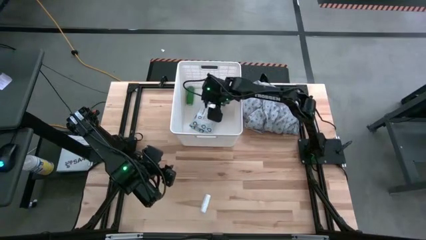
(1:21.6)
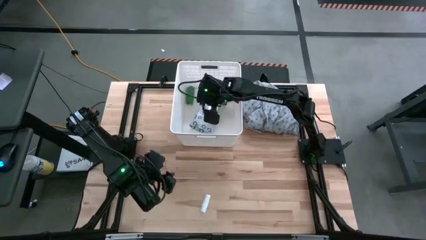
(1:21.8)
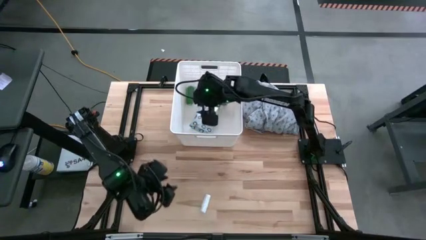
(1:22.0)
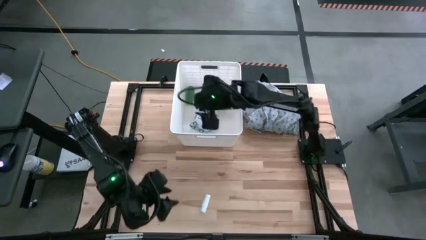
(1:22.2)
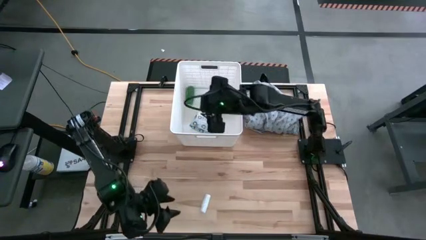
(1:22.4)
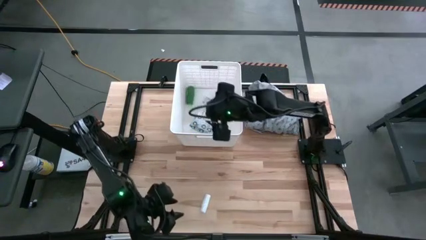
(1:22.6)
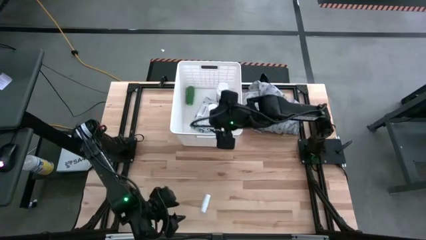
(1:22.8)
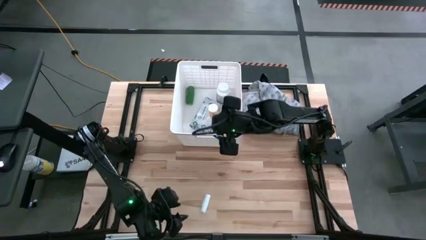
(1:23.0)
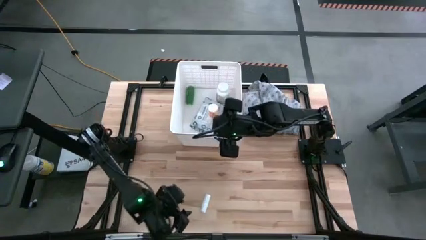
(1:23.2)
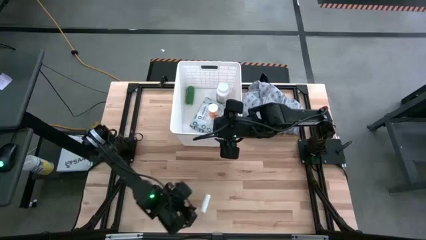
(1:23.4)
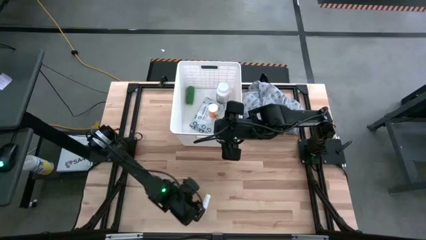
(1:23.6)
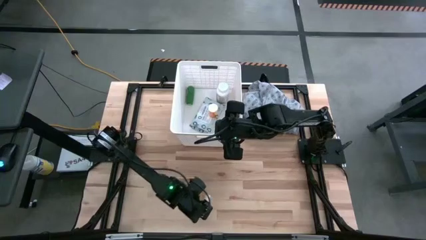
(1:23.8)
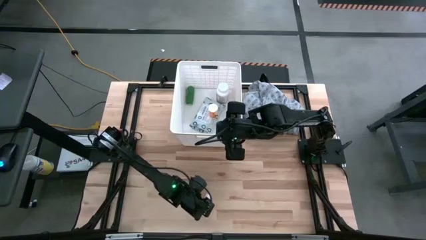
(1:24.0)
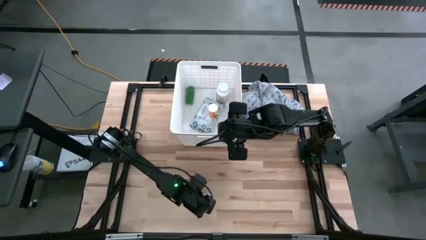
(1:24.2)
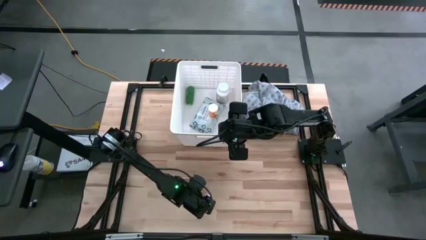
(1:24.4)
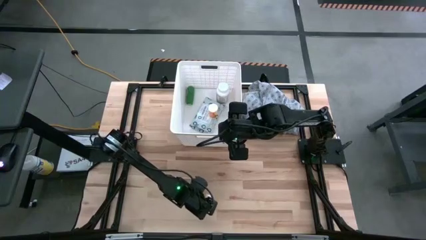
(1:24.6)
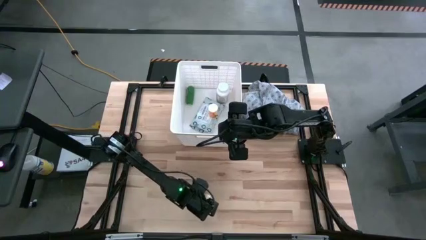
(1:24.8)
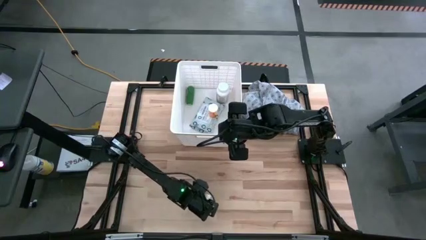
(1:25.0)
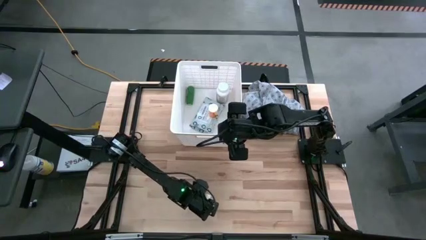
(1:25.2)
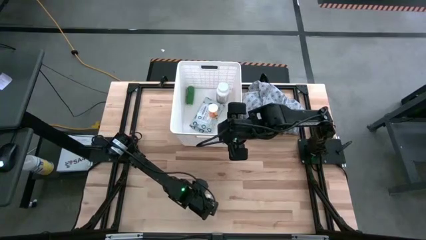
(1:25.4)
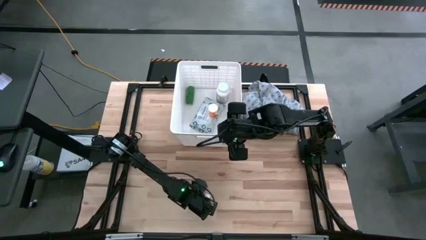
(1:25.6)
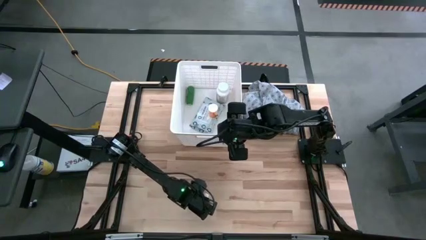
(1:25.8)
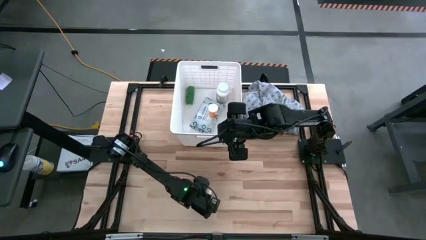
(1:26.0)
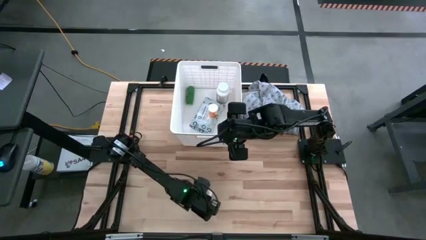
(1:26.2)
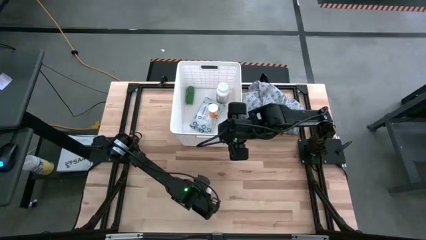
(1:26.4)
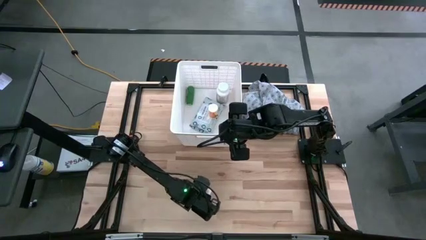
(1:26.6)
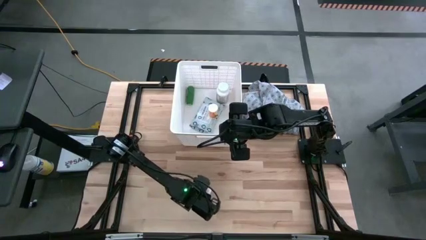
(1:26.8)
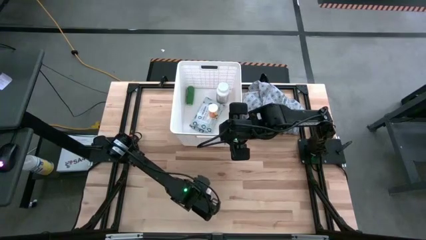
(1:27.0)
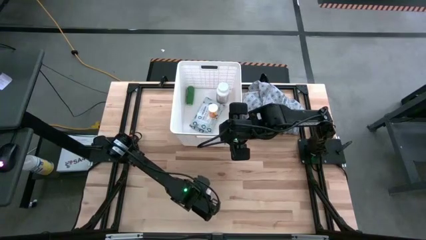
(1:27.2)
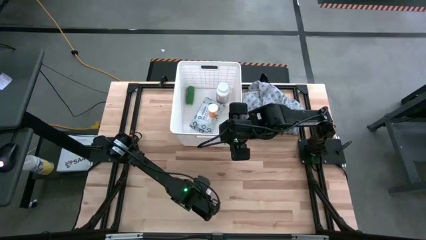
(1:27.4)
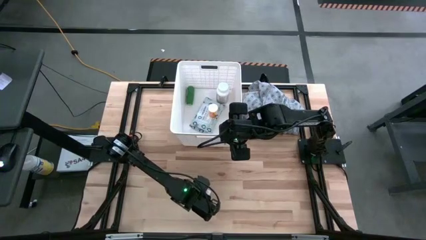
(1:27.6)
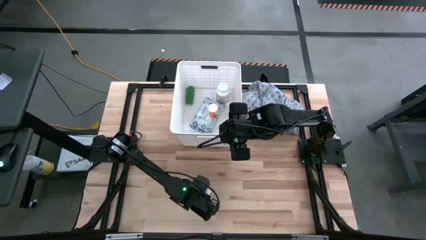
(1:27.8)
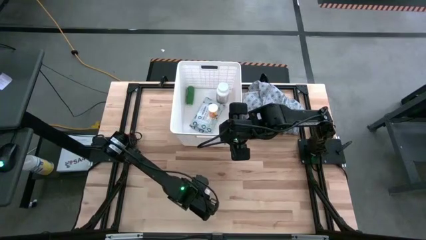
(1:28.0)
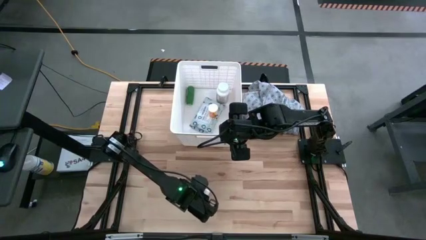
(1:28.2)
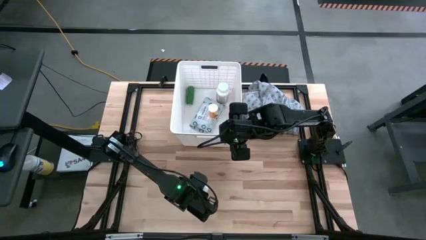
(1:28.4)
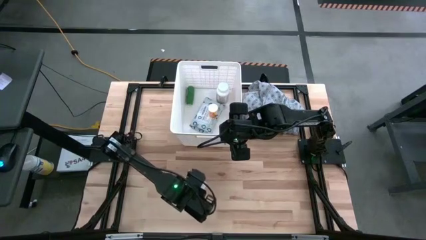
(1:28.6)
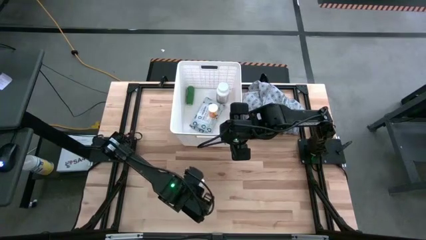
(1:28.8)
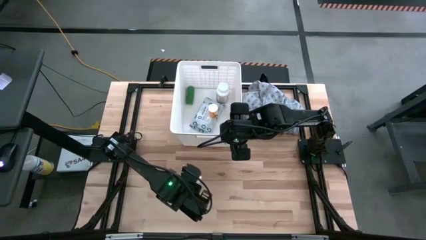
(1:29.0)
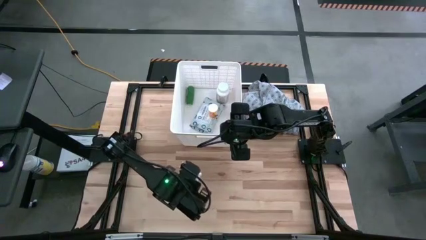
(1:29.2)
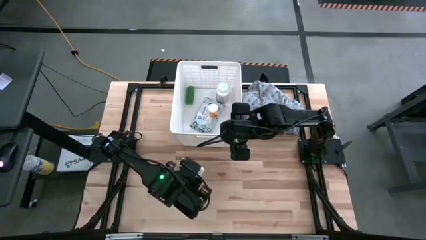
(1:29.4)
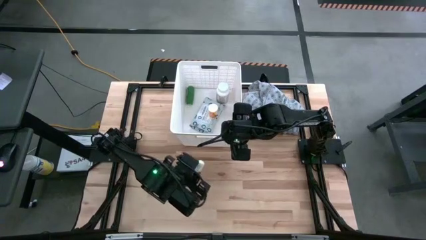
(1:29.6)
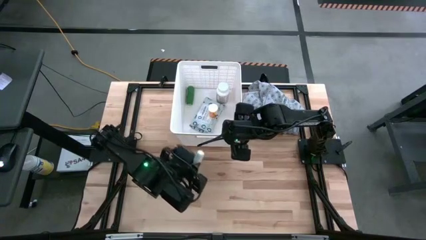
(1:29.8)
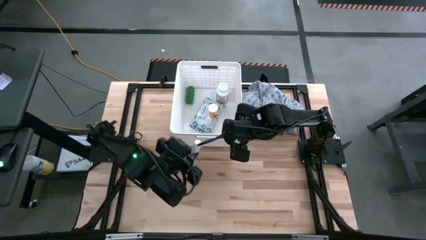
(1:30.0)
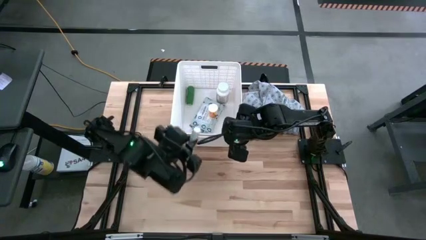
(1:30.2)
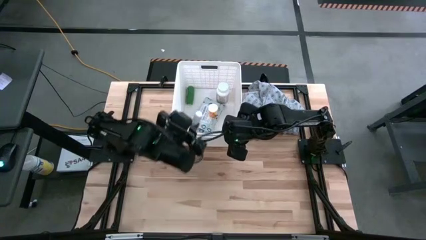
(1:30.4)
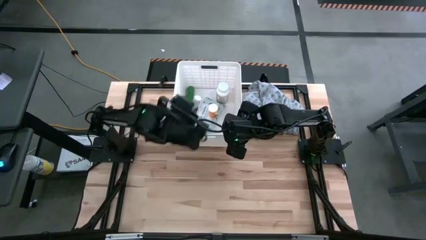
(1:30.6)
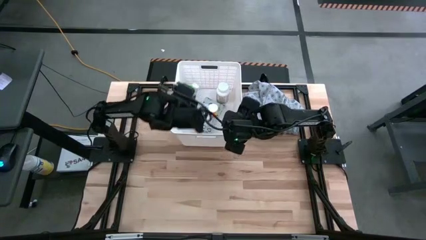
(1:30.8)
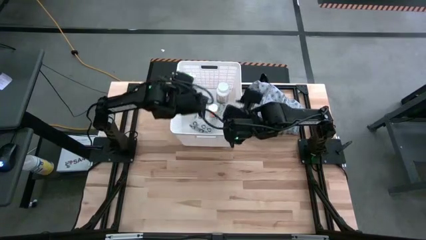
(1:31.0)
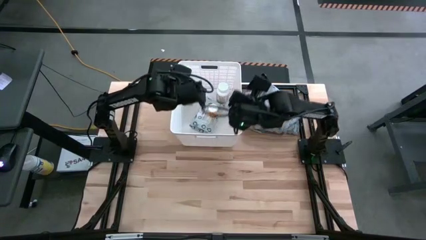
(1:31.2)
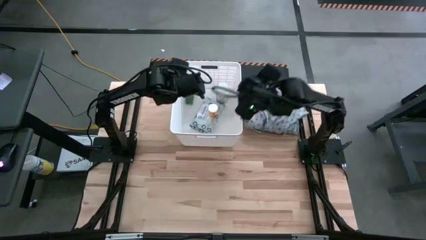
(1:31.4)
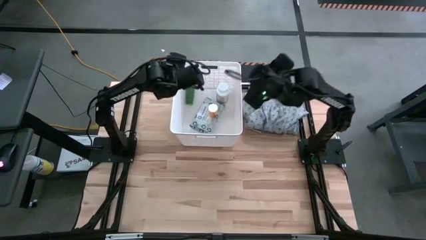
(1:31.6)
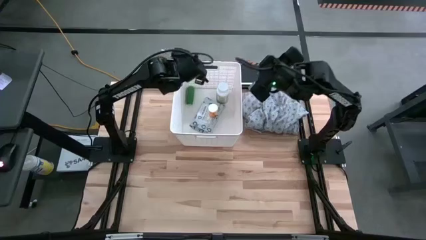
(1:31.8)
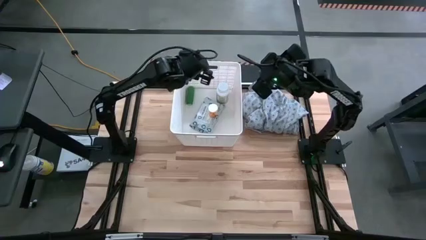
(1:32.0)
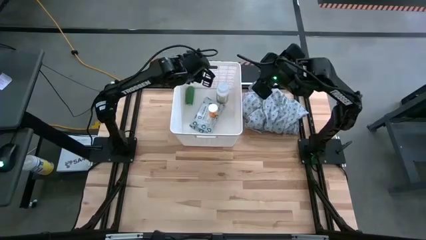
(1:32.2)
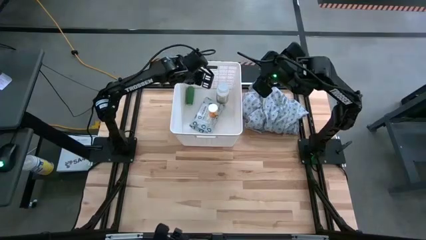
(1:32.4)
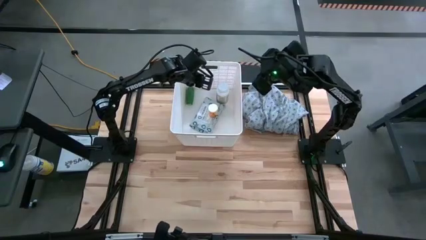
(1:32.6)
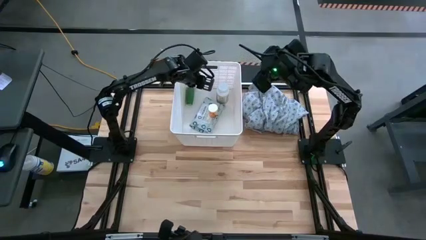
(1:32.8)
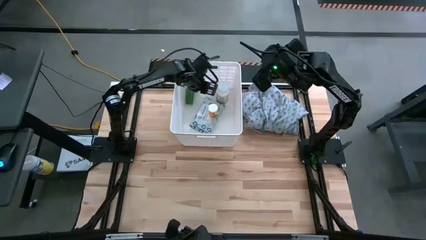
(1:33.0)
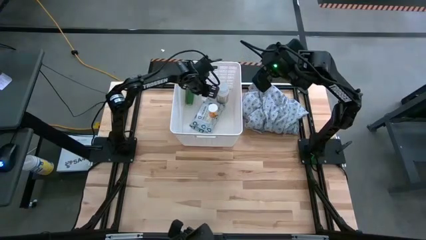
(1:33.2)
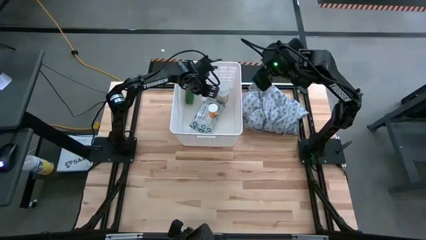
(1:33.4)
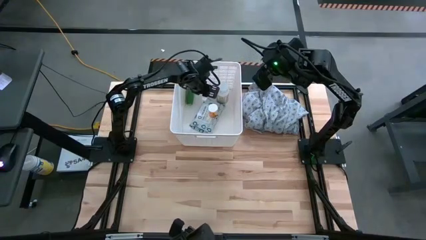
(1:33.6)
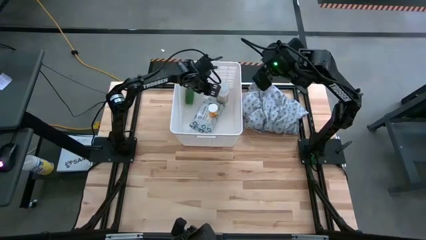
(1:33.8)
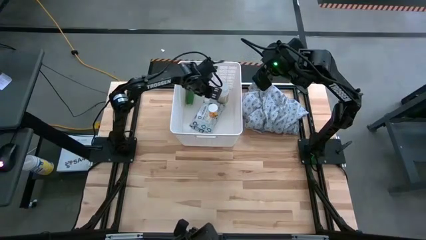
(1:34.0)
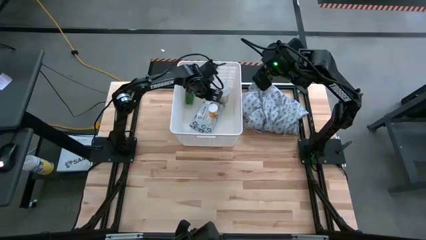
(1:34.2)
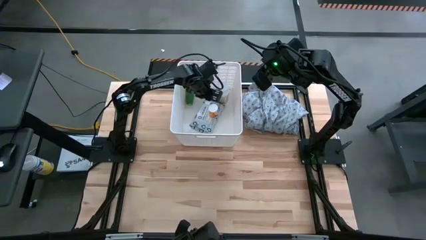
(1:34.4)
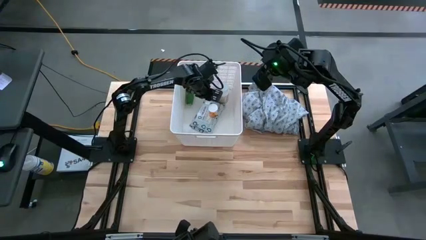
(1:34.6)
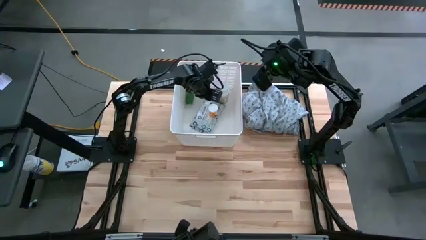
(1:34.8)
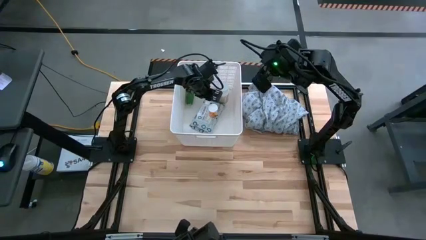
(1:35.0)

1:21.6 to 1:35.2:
Task: Pick & place medical supplies in basket/bin
Put the white bandage into the white laundry organizer
